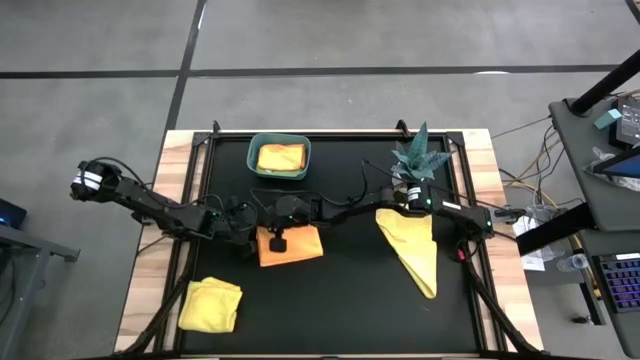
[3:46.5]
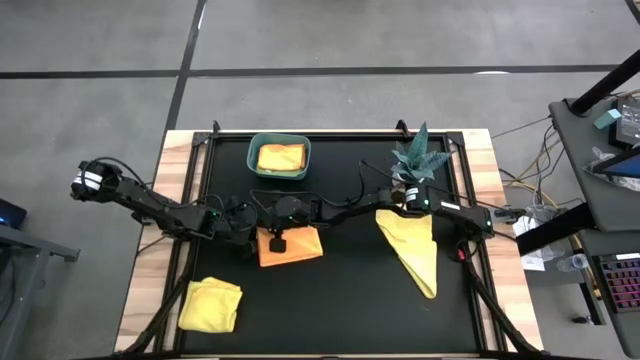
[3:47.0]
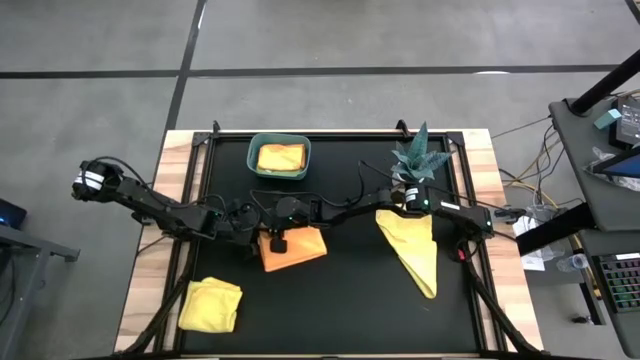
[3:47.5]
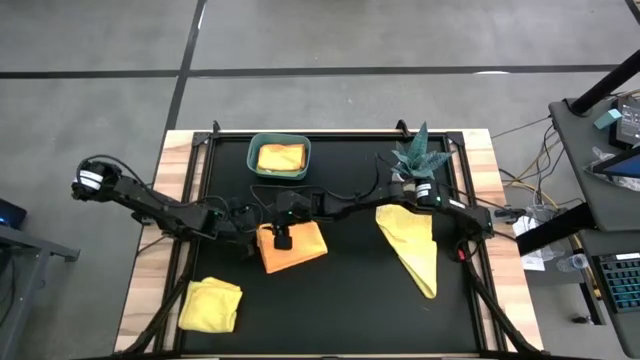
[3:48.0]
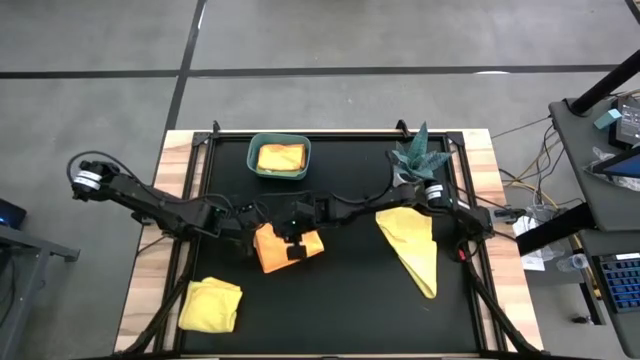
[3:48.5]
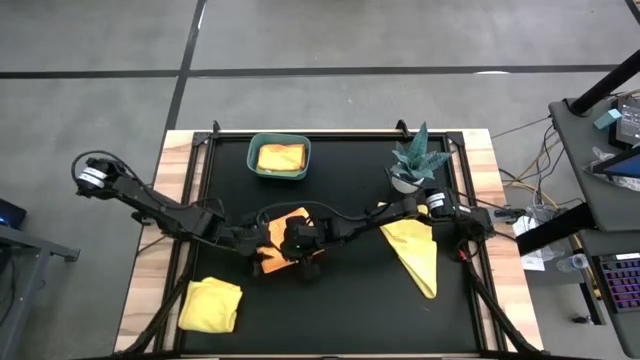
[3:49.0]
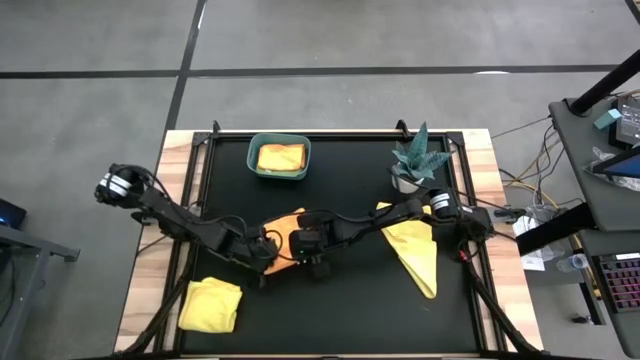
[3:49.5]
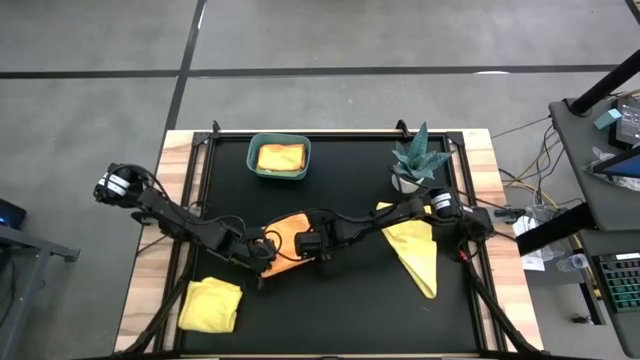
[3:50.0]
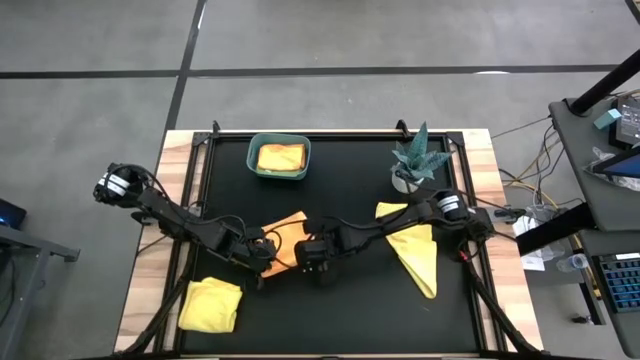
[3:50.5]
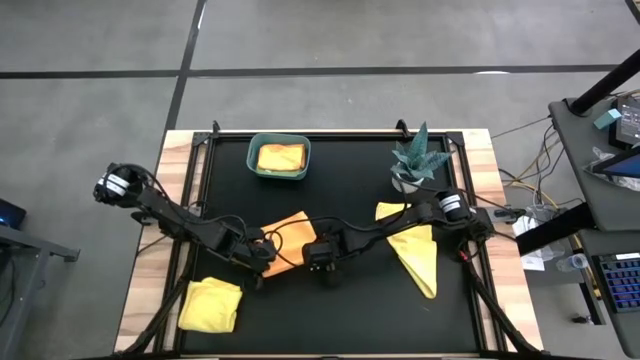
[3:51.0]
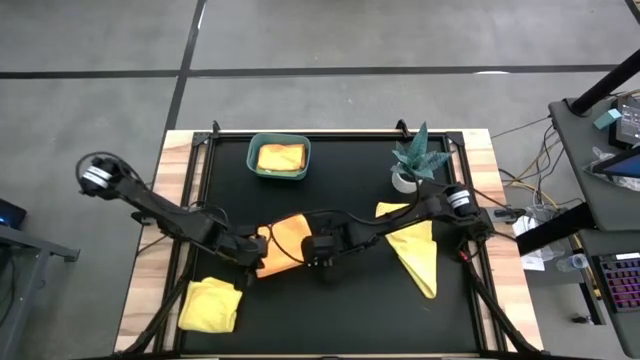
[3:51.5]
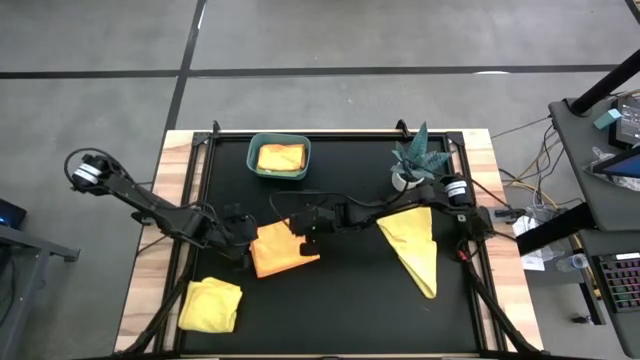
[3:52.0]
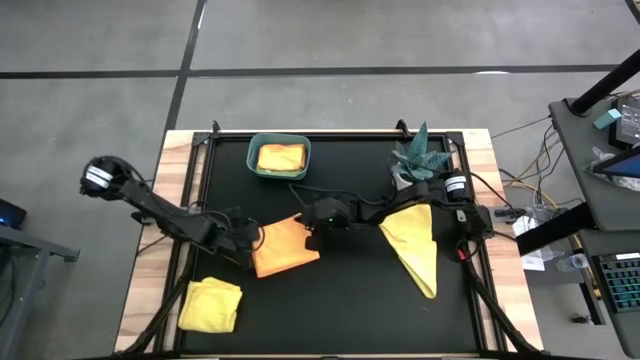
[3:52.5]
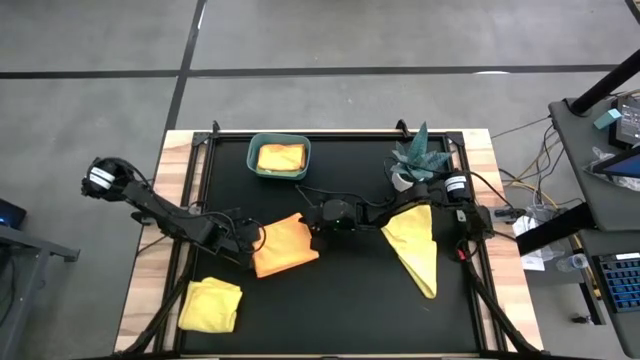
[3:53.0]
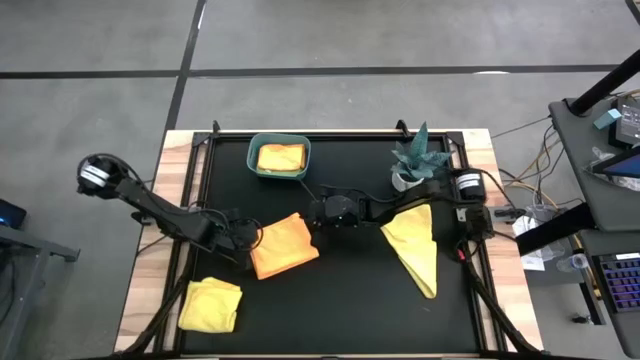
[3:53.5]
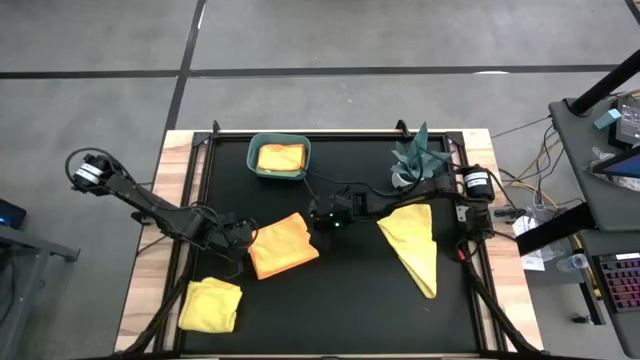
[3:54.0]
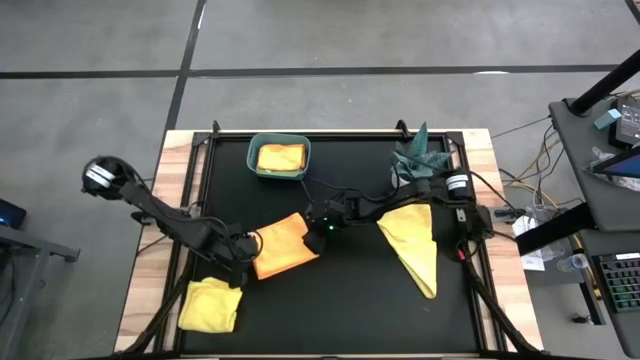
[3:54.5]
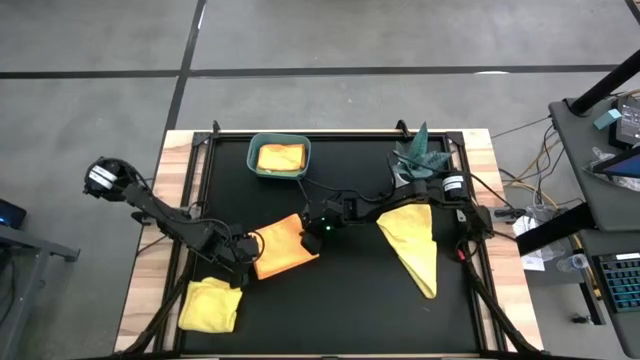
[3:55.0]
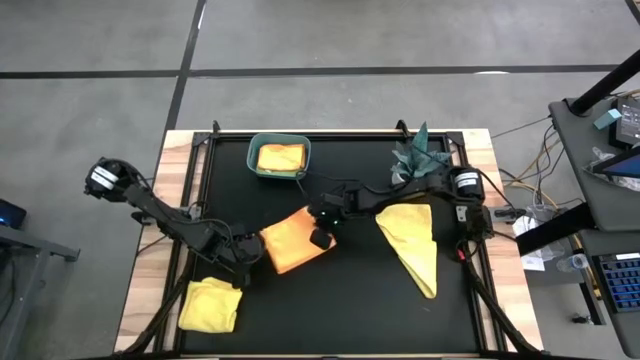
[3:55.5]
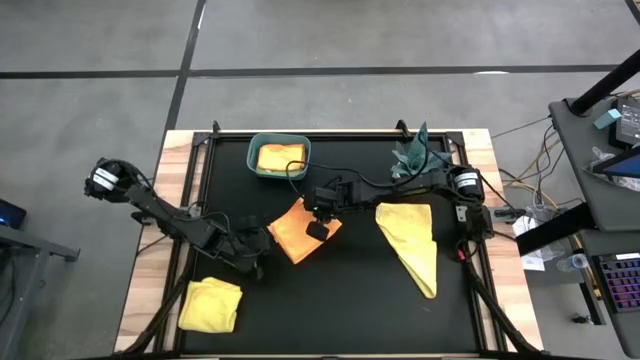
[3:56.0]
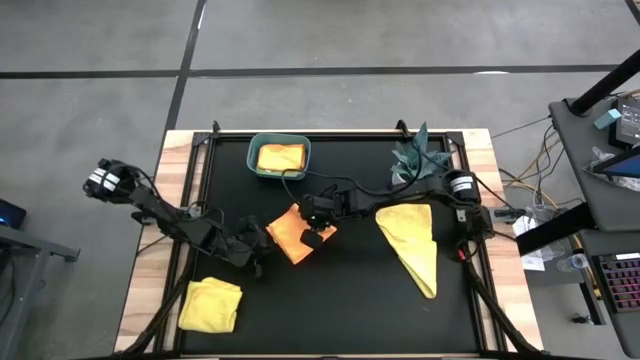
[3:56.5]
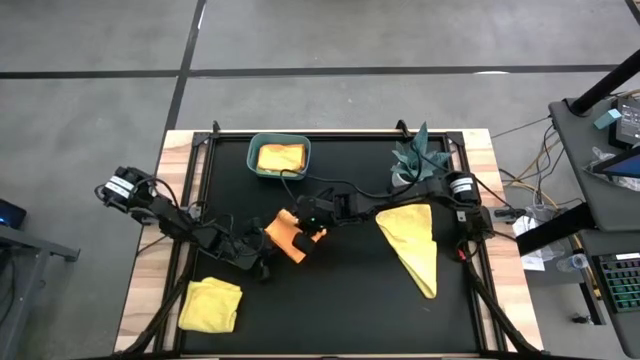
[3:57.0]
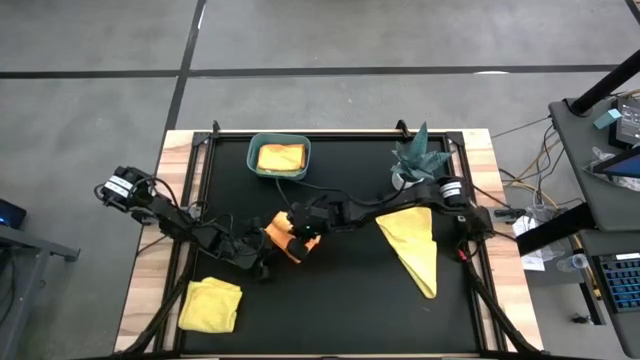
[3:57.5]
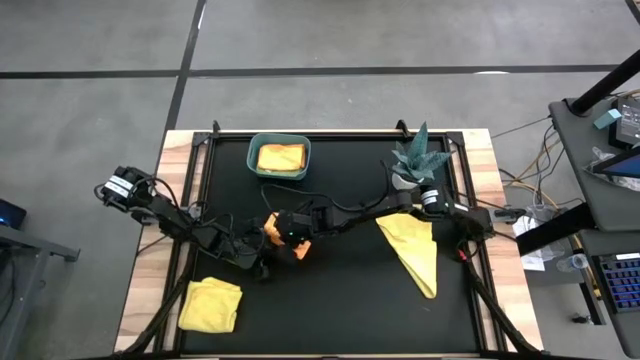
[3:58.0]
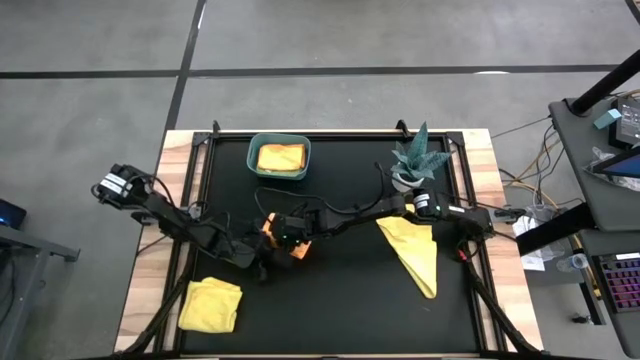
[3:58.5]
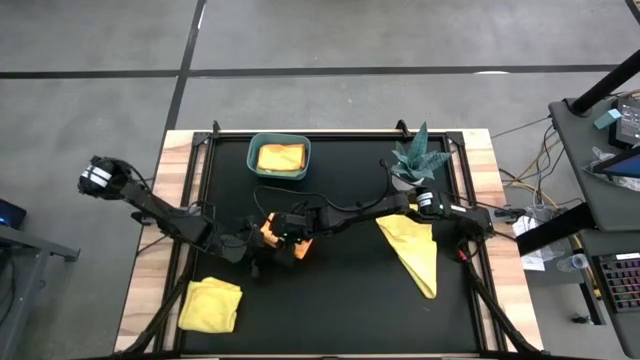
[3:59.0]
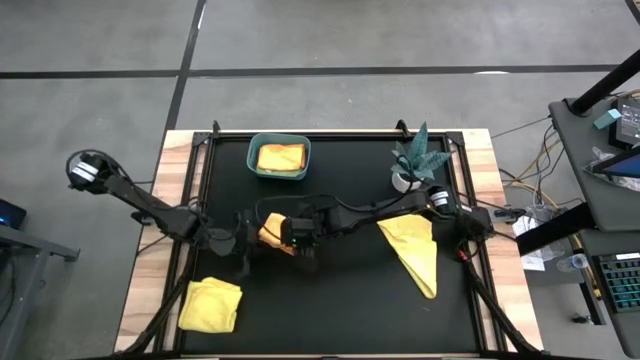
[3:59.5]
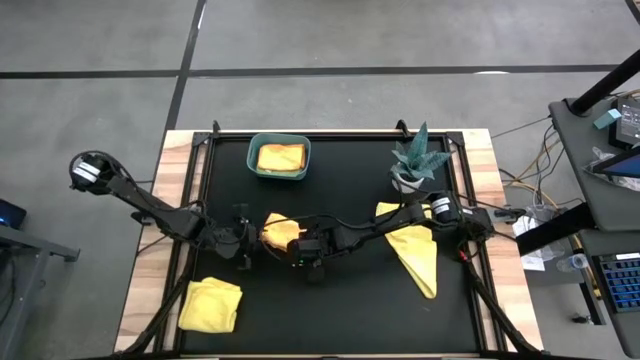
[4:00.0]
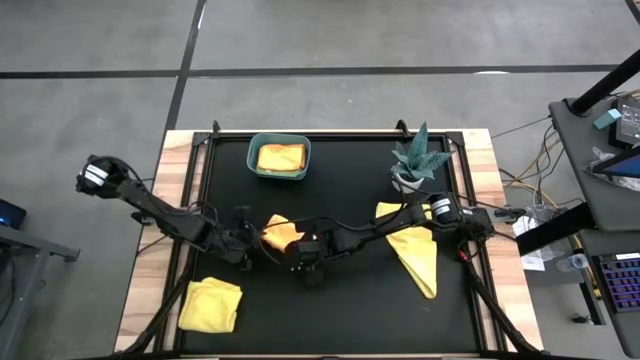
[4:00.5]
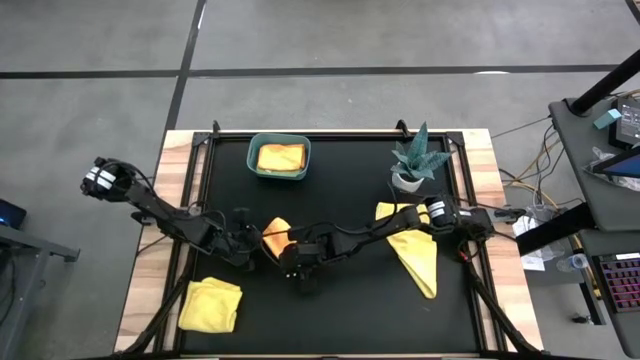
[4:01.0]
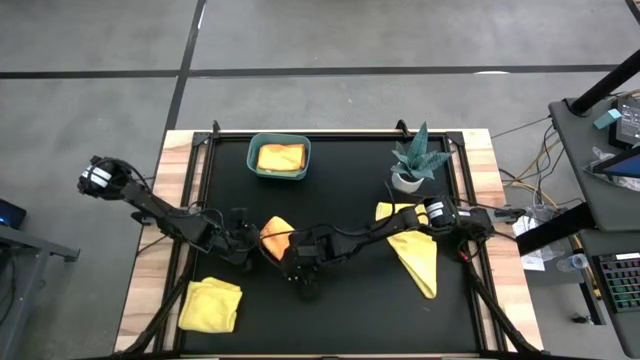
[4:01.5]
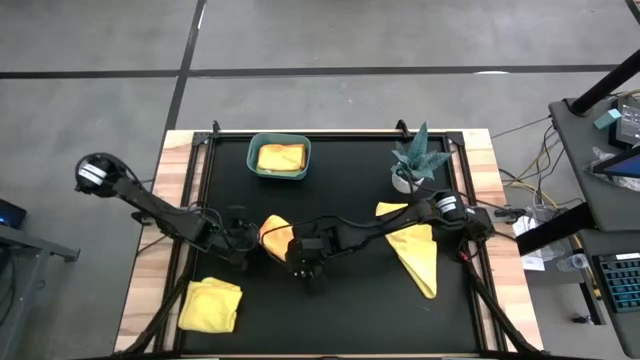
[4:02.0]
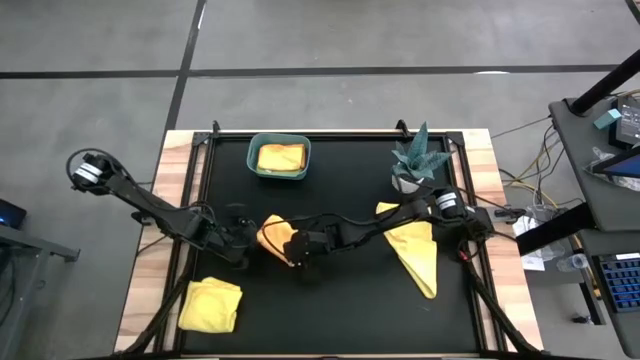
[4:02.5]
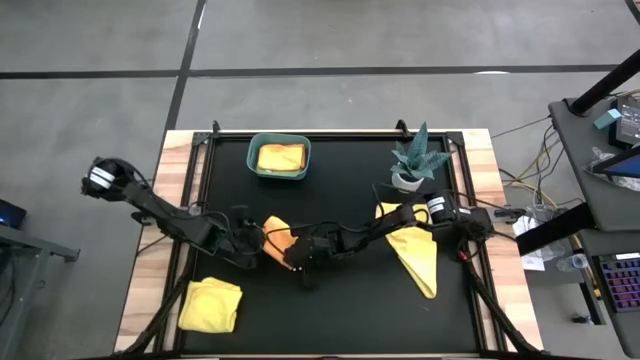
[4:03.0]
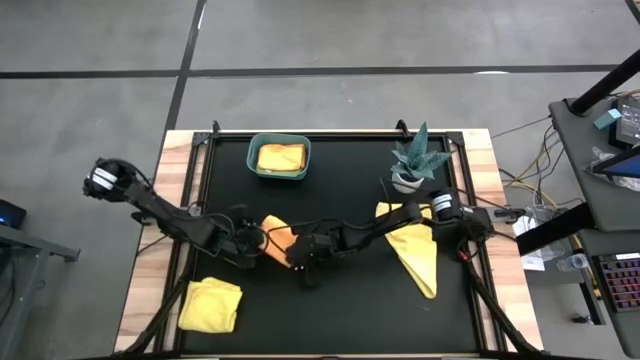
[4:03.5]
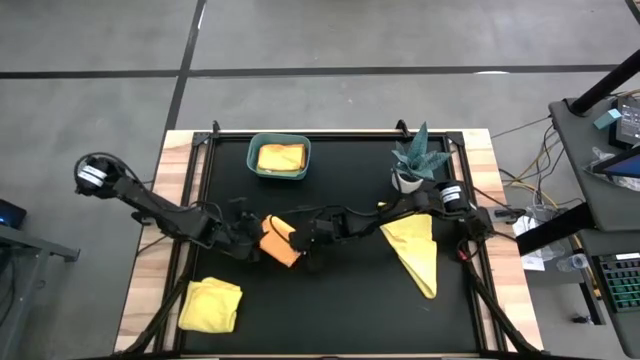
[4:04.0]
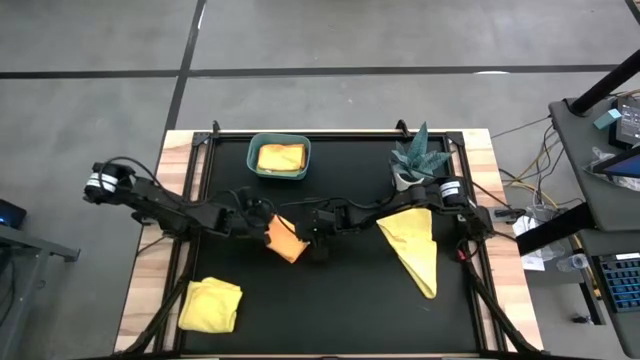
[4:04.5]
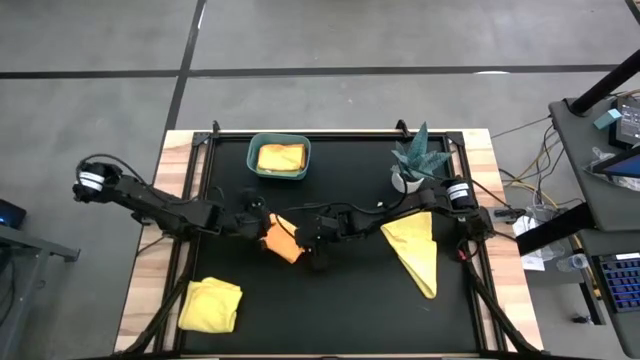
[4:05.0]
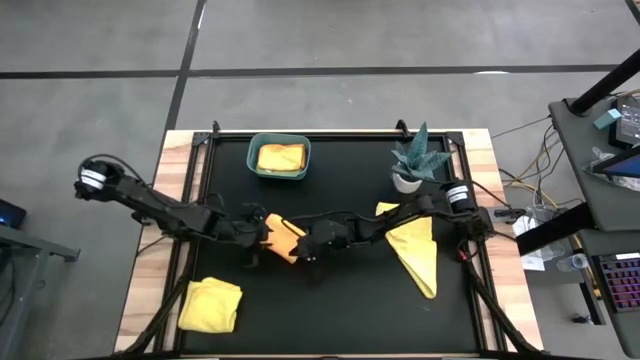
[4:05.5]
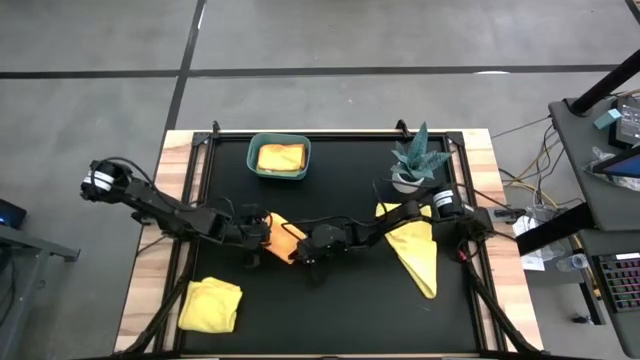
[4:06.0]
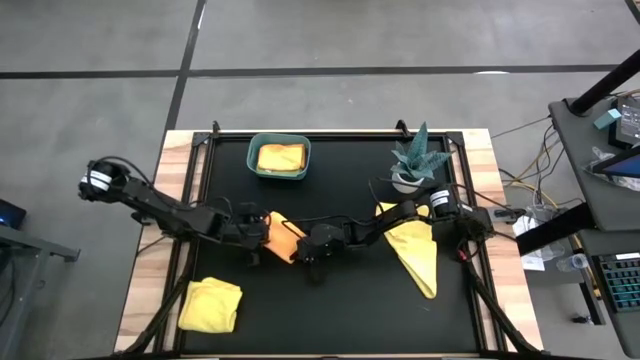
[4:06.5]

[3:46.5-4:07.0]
Task: Fold microfiber towels
Fold the orange microfiber cloth
